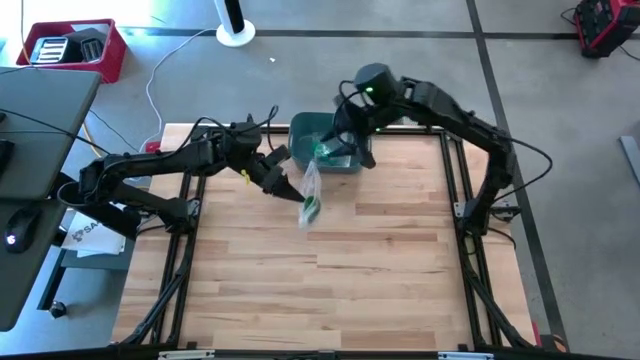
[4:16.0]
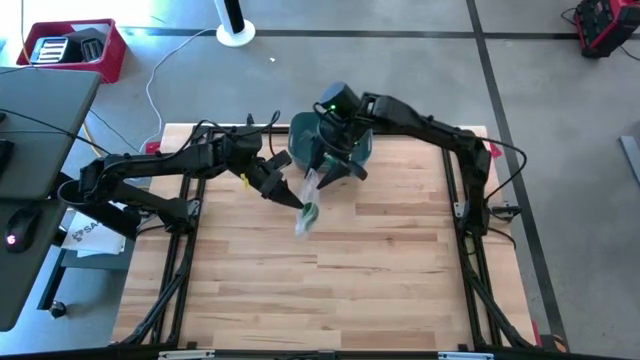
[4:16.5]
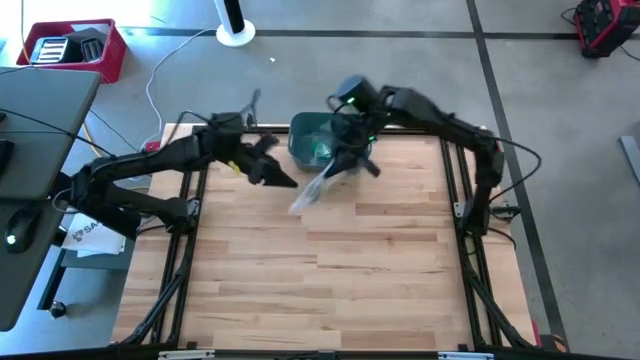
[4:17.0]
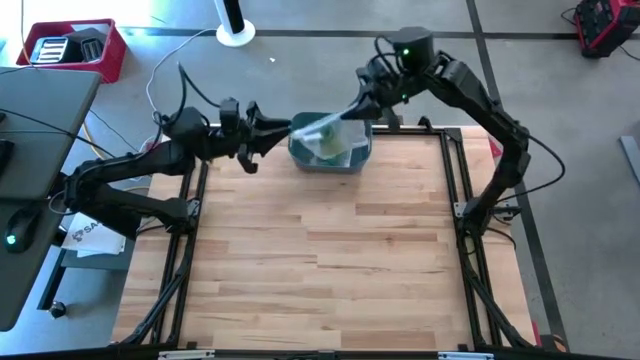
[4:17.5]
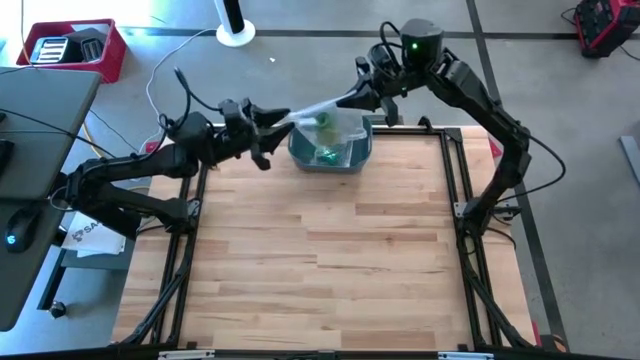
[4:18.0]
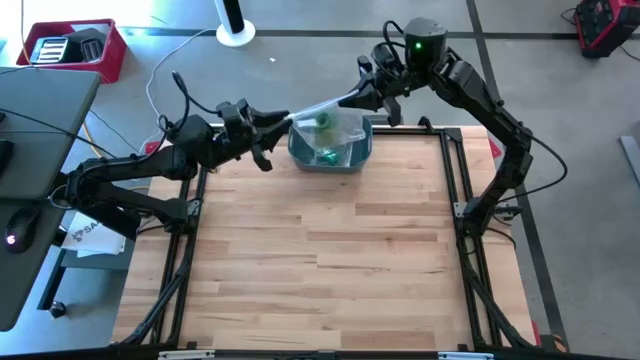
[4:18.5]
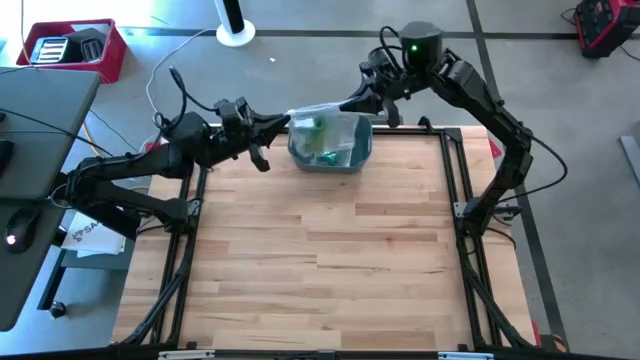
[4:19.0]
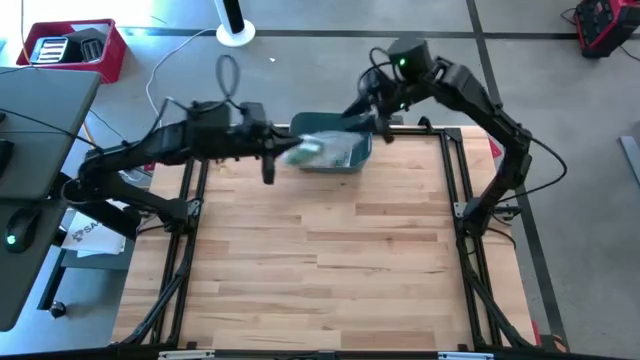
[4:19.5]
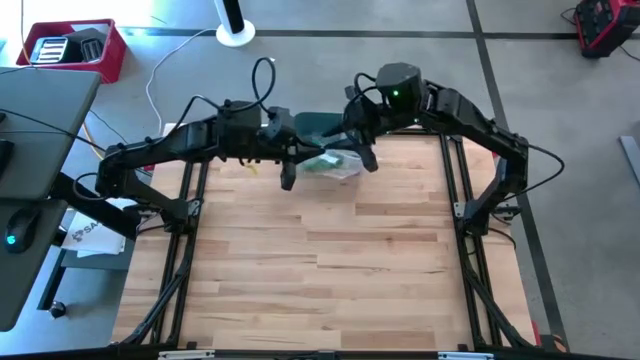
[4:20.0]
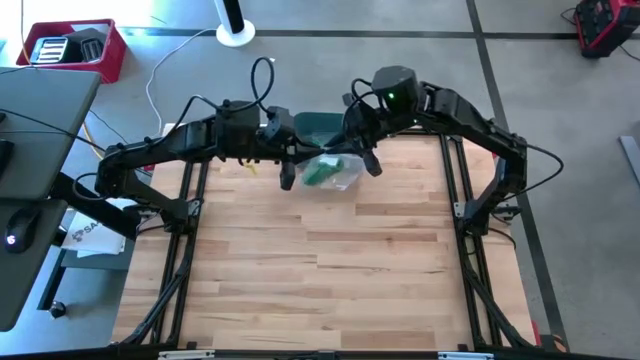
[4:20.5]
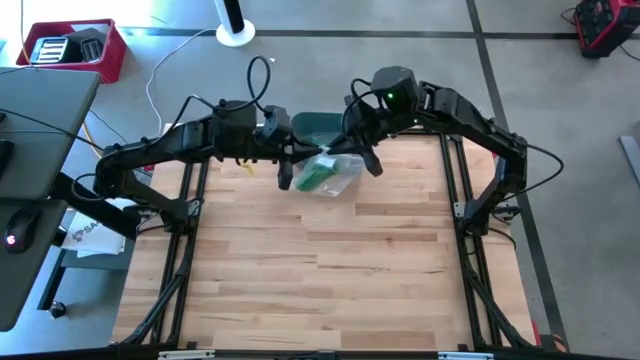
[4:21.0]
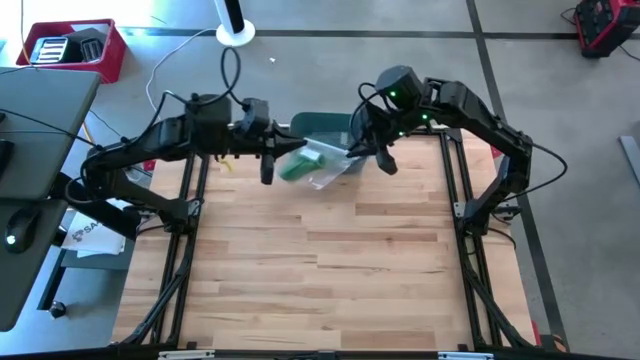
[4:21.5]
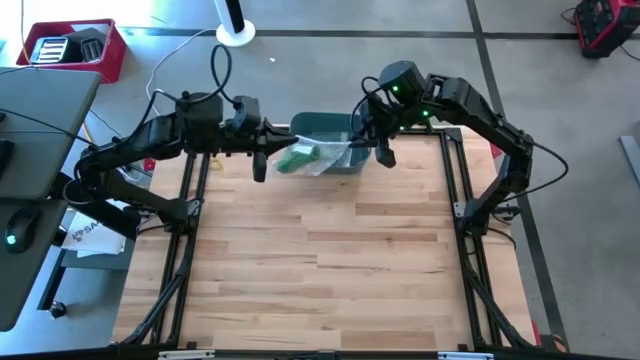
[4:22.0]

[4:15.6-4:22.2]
Task: Roll bandage
Close the transparent zip bag

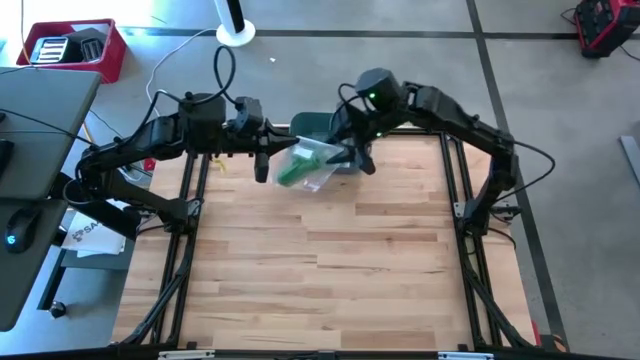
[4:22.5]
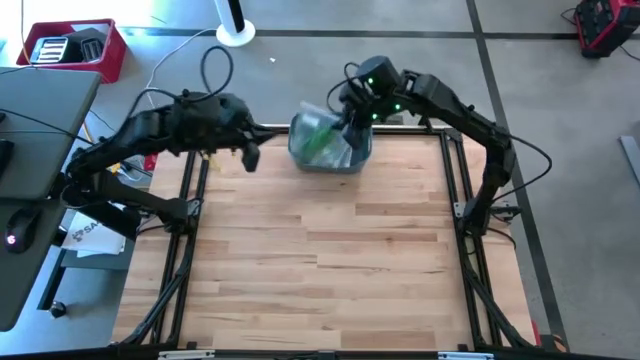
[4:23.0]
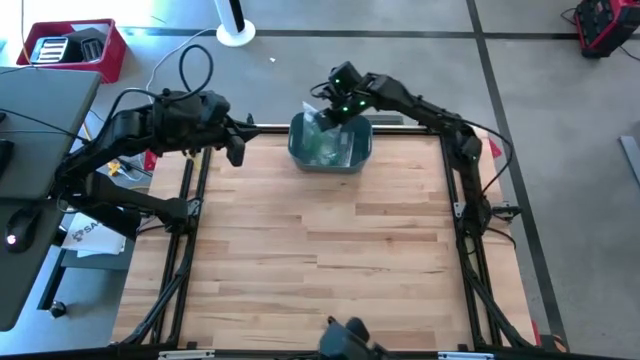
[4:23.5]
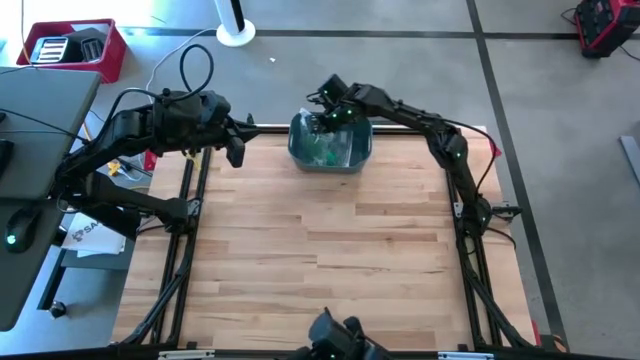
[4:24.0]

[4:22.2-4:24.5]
Put the packaged green bandage into the blue bin

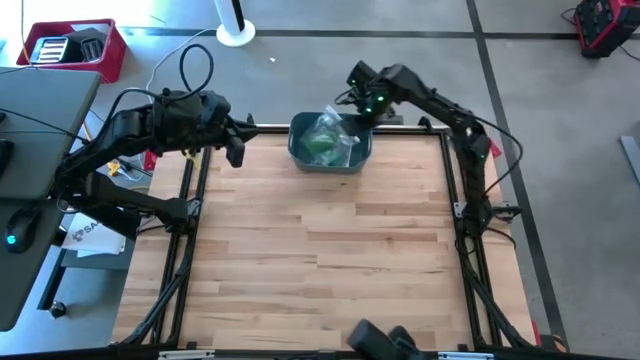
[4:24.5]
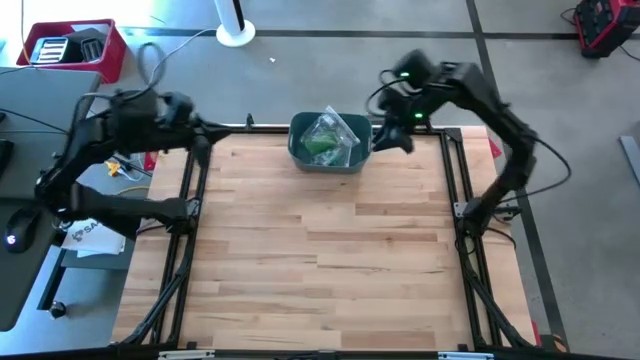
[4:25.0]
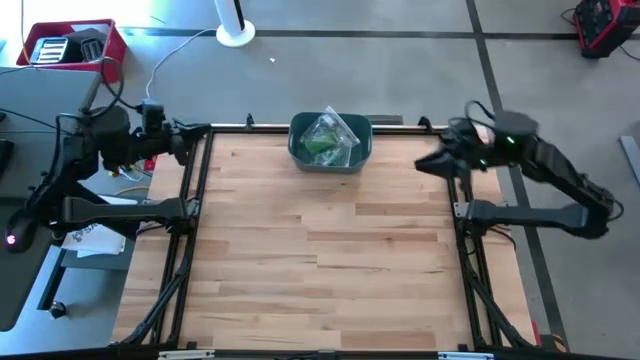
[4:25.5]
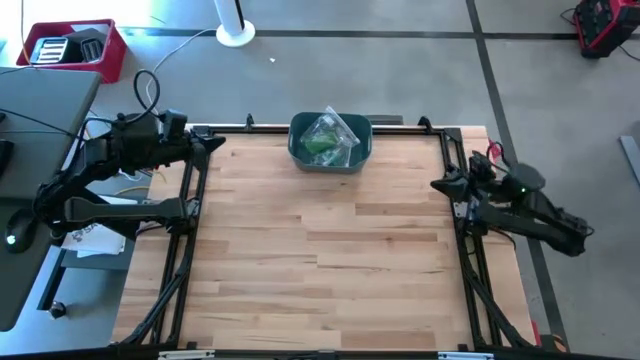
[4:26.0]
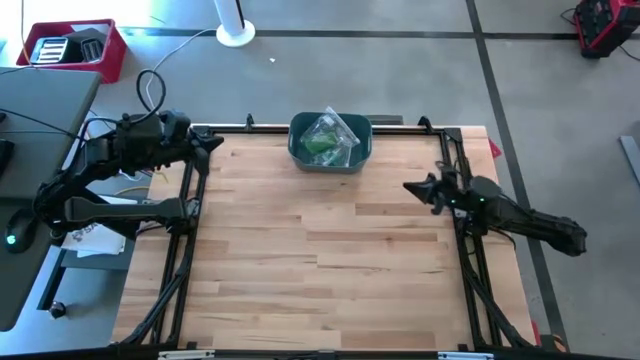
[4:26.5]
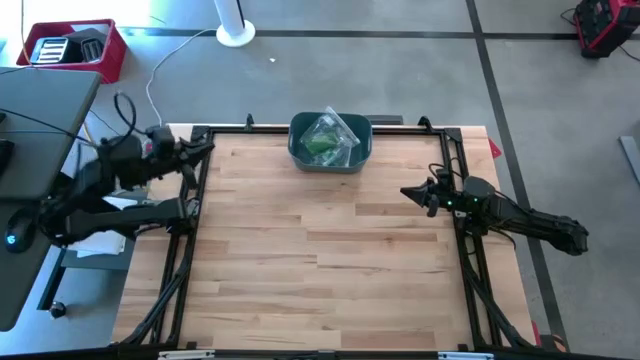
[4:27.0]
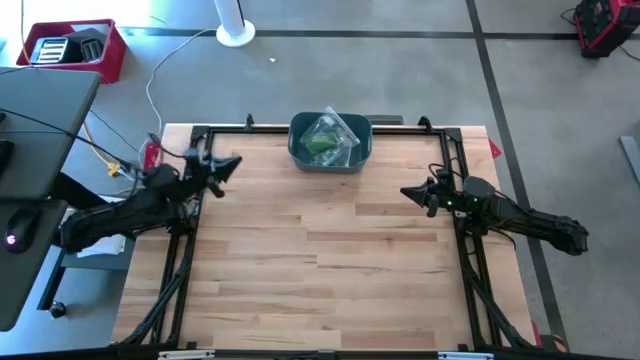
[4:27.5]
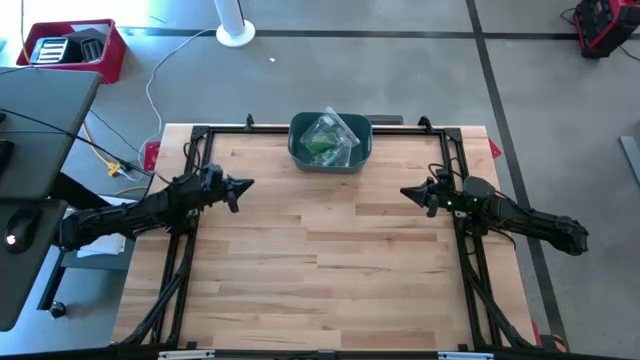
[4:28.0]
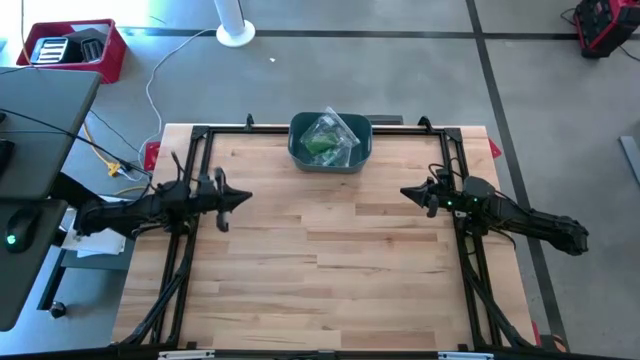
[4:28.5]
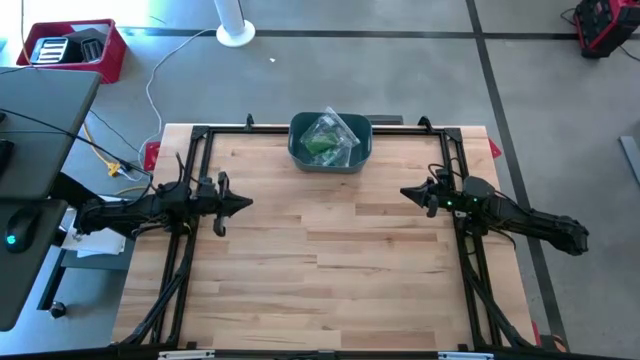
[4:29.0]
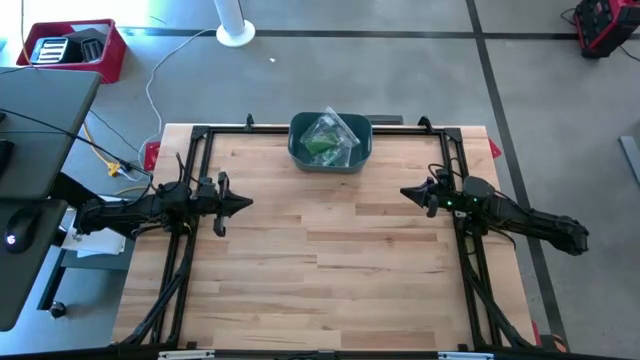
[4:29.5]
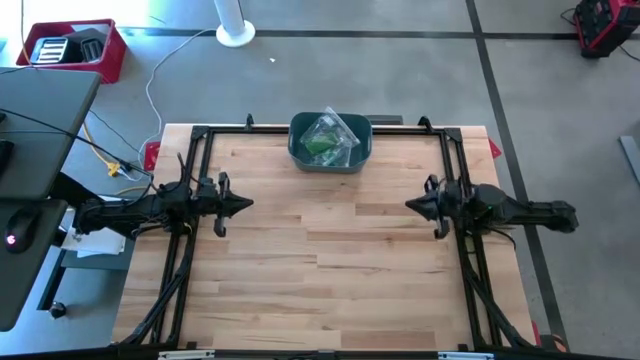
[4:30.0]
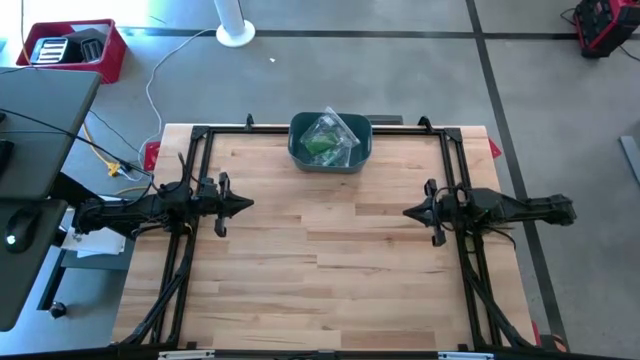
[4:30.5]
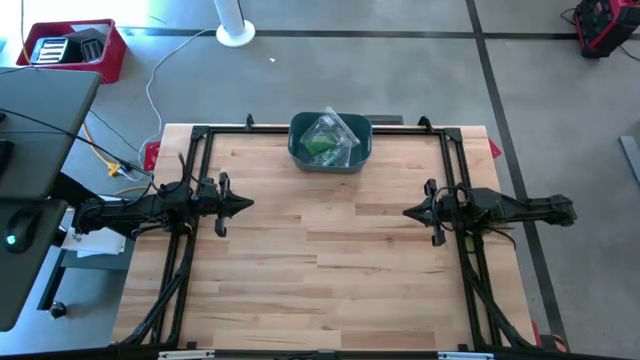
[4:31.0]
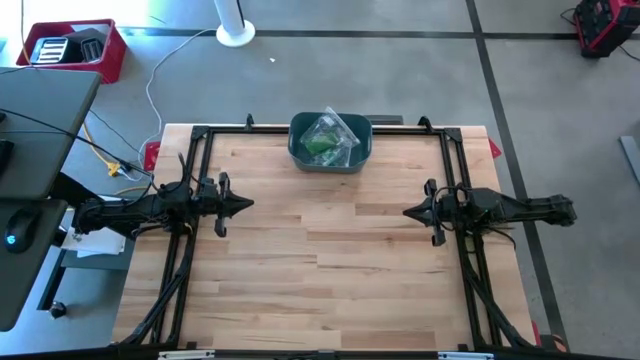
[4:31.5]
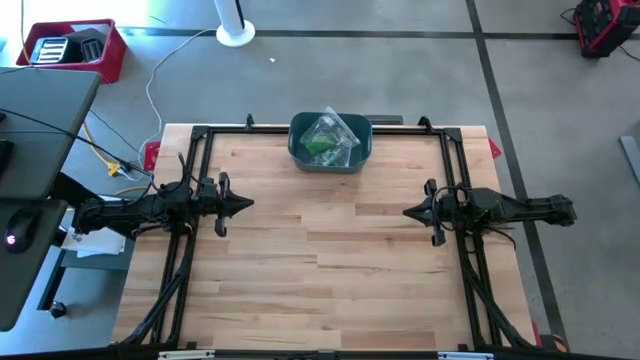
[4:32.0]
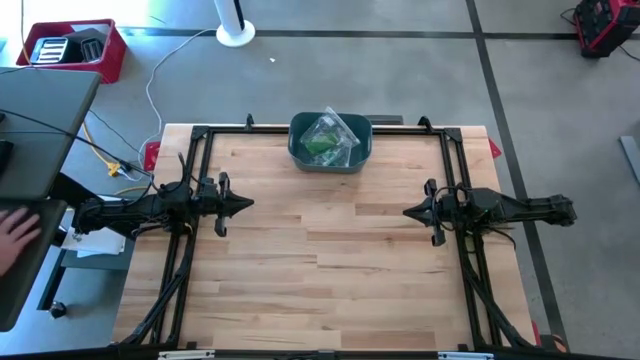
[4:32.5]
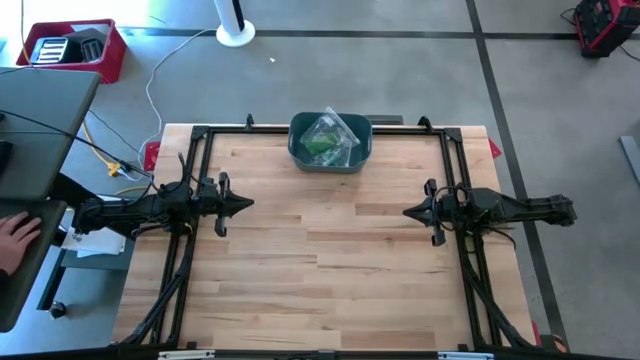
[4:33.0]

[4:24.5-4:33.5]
Return to Home Position

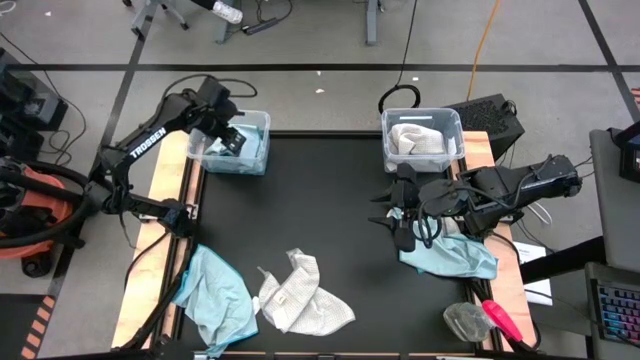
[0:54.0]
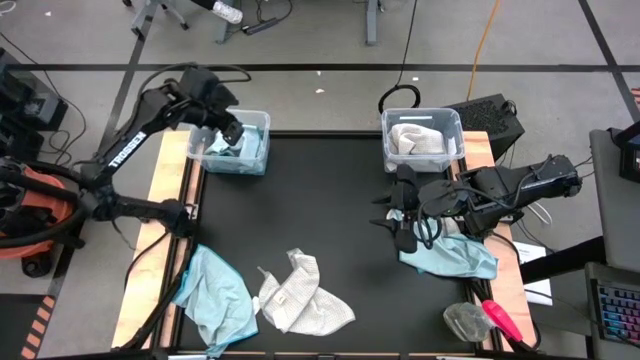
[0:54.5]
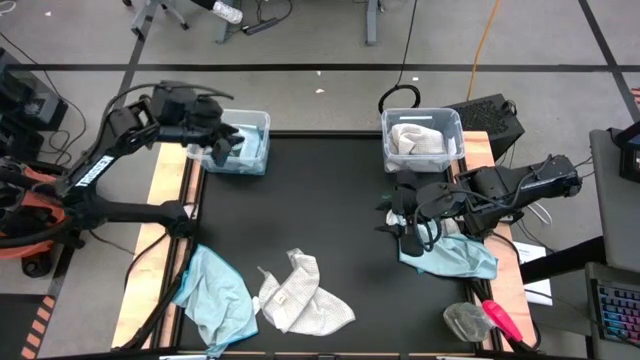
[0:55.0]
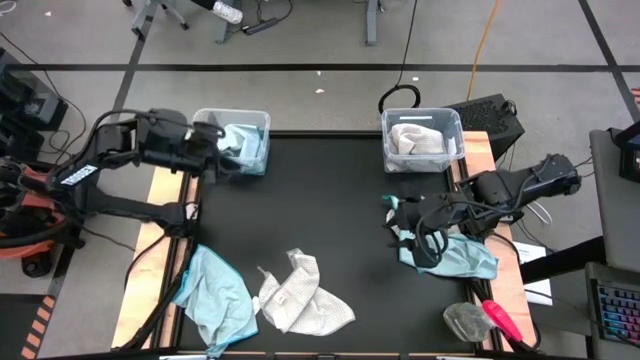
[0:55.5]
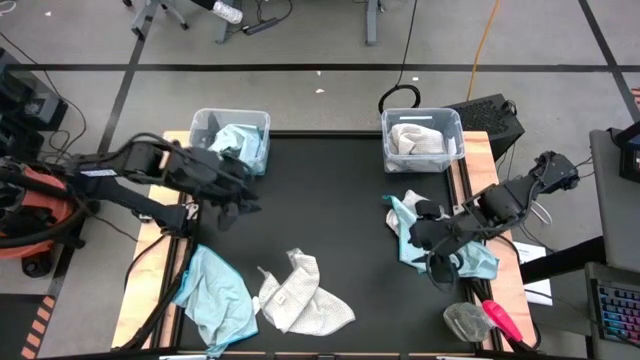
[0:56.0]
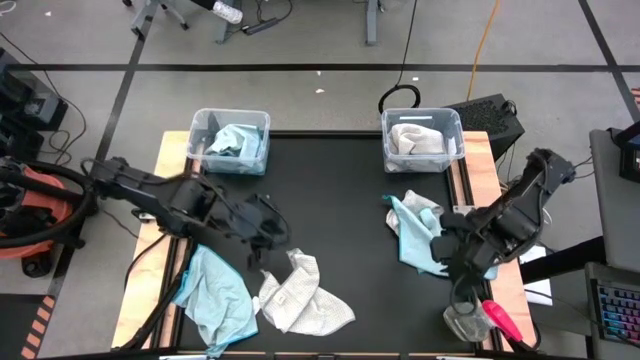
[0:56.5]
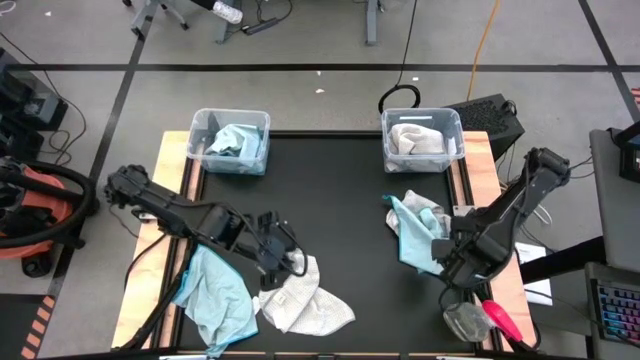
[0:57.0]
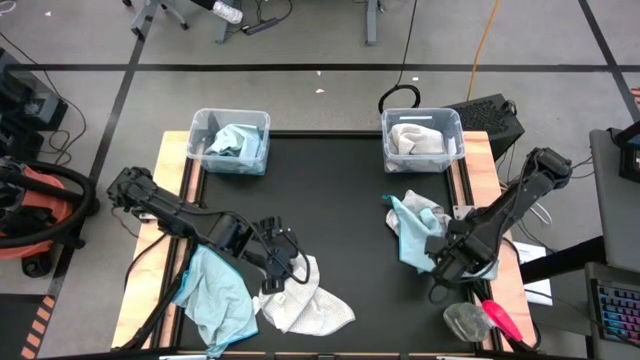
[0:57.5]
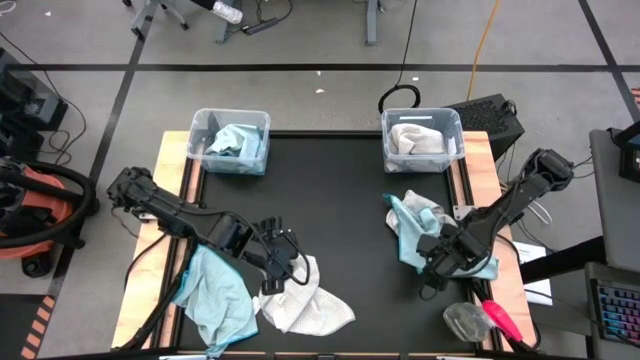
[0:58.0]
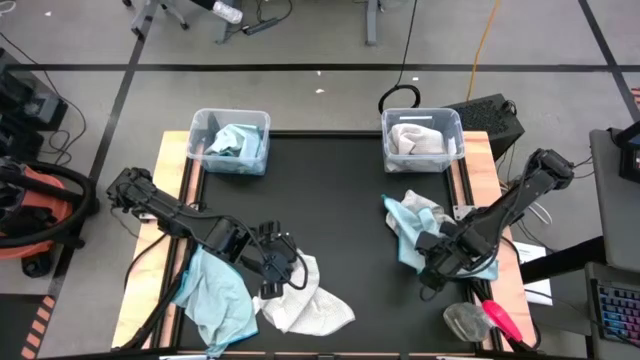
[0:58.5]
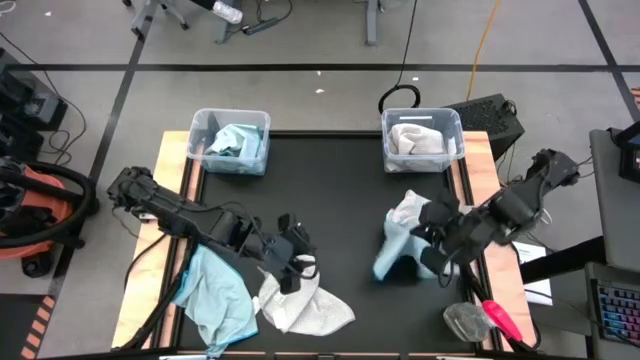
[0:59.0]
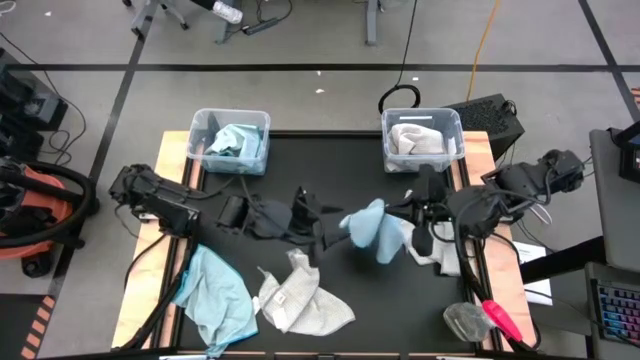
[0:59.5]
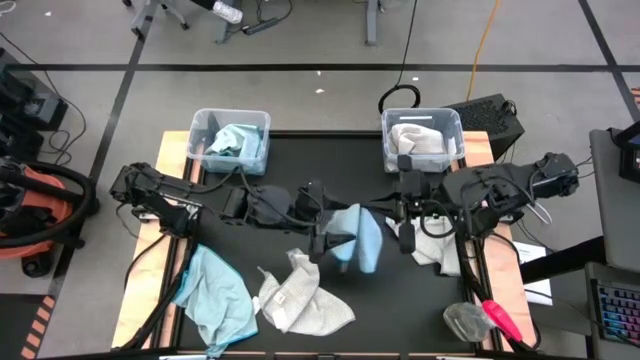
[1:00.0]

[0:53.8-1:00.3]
Task: Sort microfiber towel by color & place in baskets
Put the blue towel into the left transparent bin
